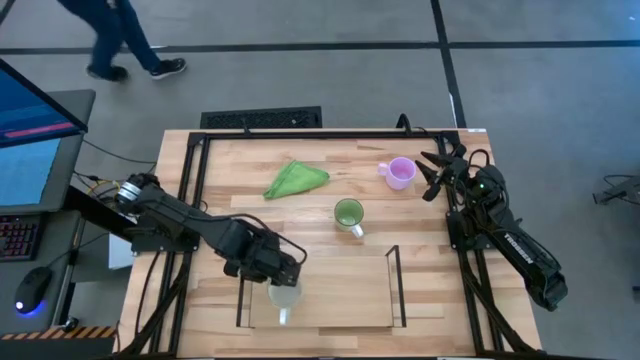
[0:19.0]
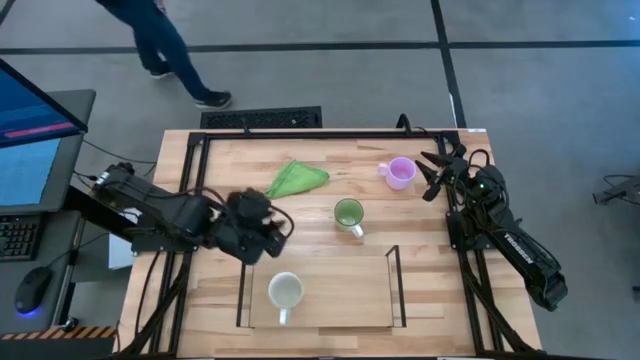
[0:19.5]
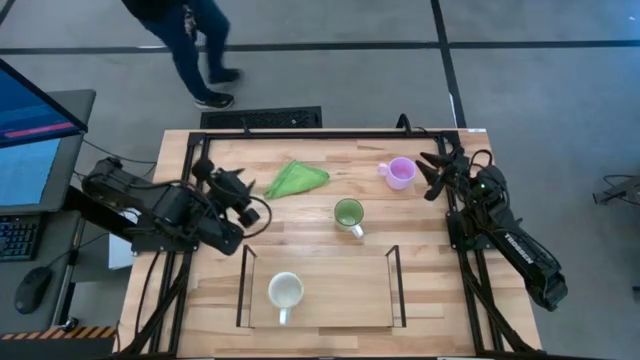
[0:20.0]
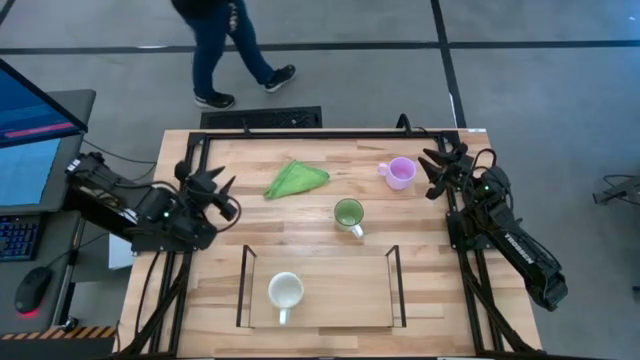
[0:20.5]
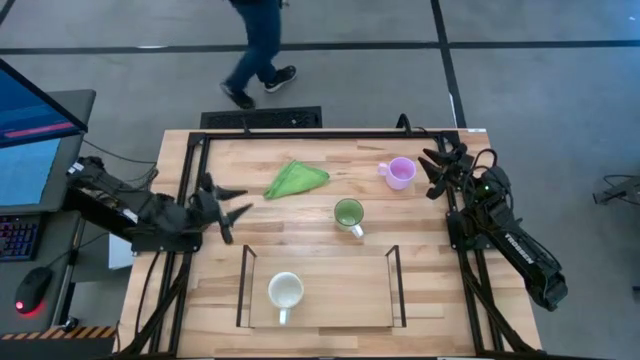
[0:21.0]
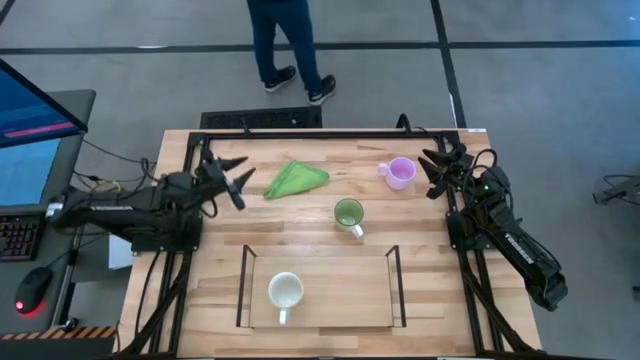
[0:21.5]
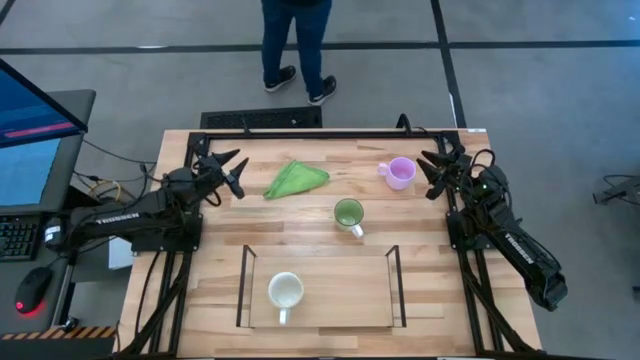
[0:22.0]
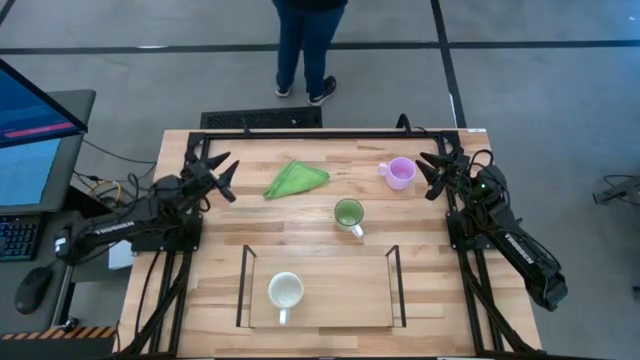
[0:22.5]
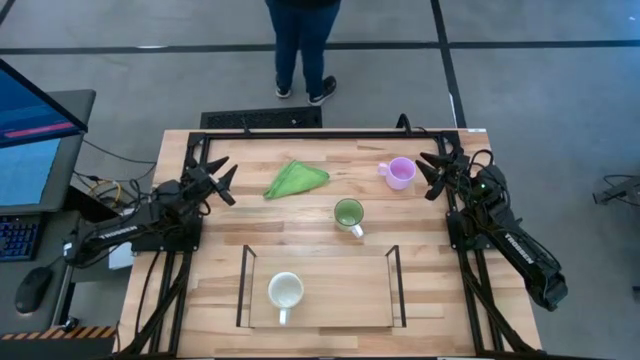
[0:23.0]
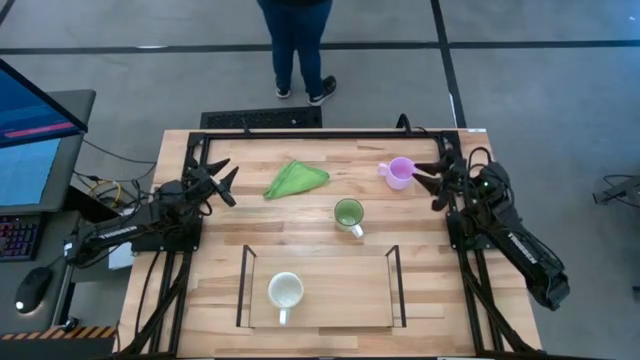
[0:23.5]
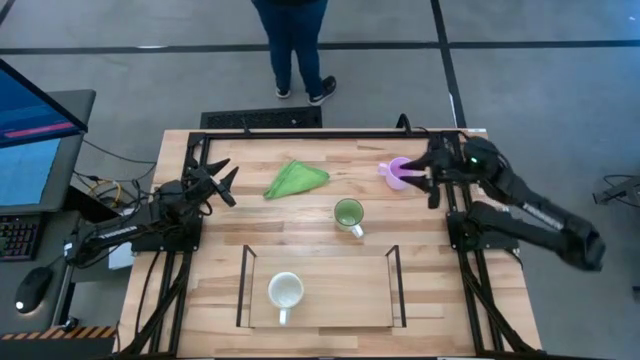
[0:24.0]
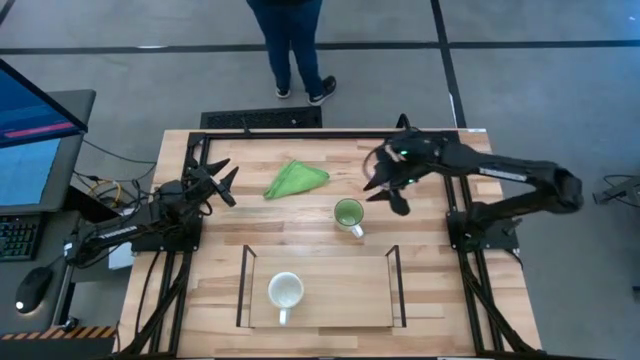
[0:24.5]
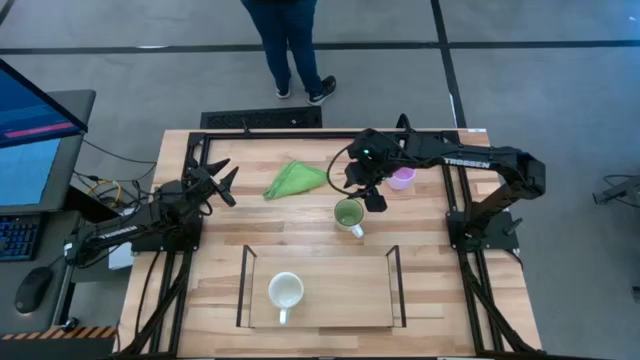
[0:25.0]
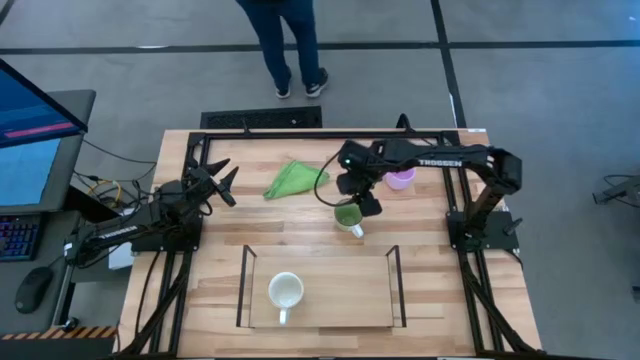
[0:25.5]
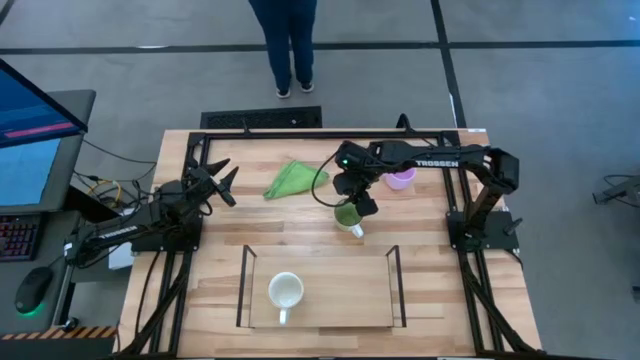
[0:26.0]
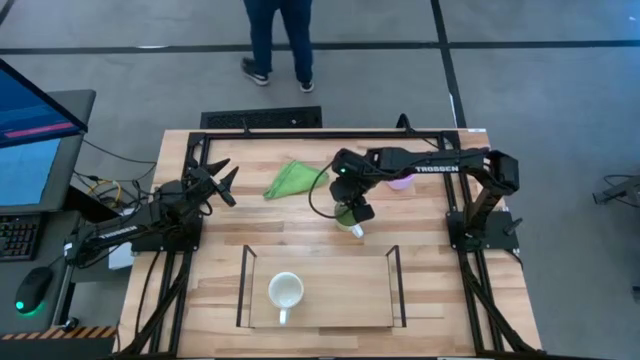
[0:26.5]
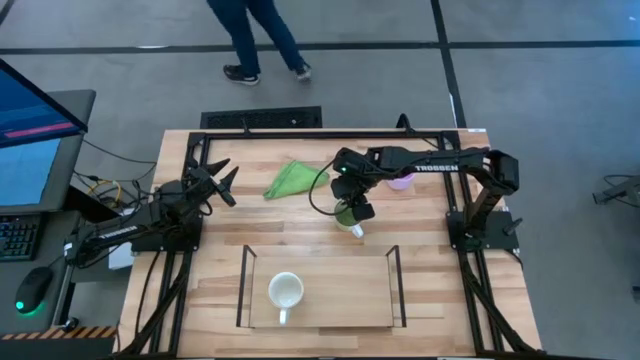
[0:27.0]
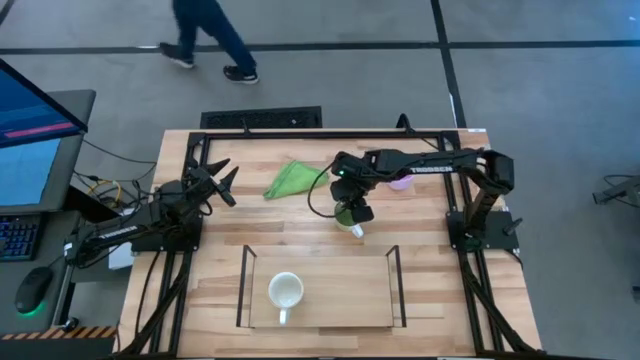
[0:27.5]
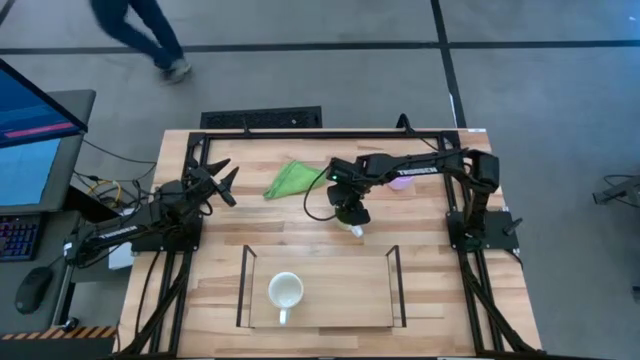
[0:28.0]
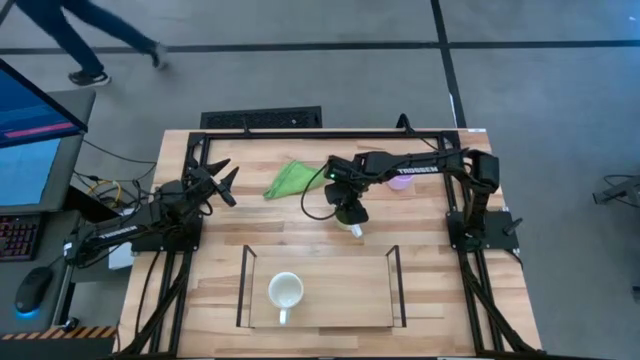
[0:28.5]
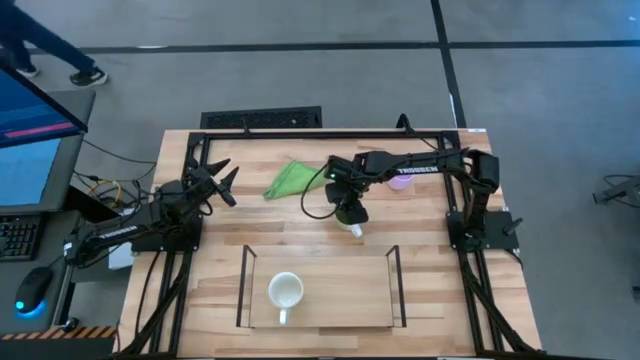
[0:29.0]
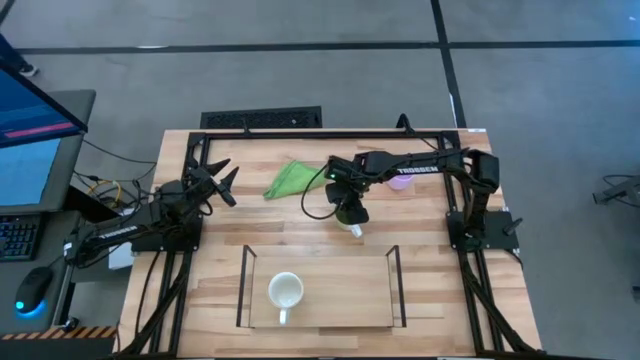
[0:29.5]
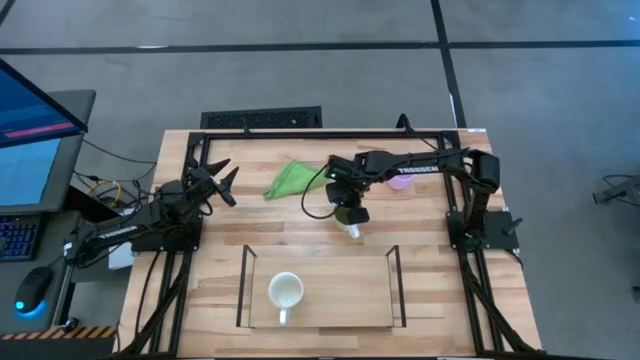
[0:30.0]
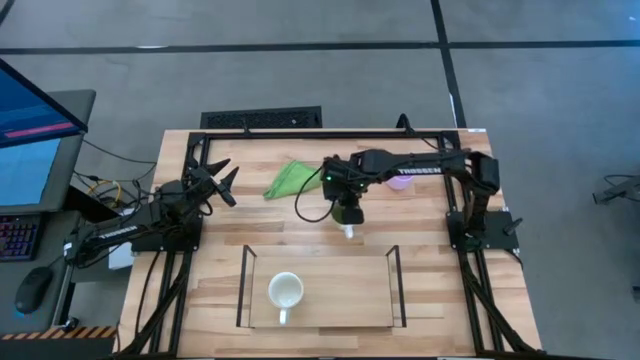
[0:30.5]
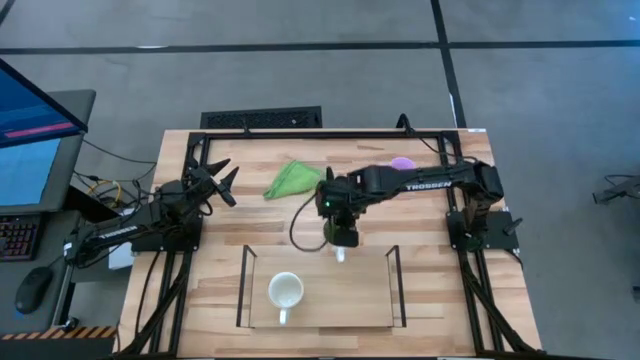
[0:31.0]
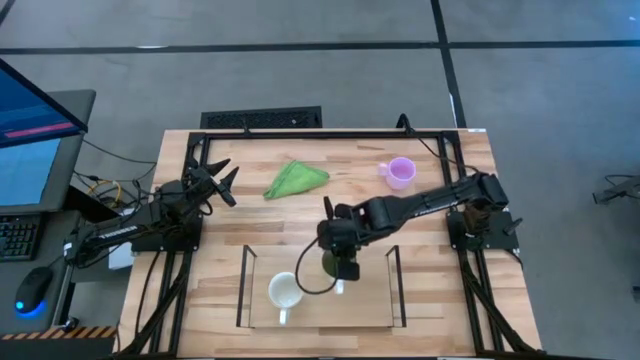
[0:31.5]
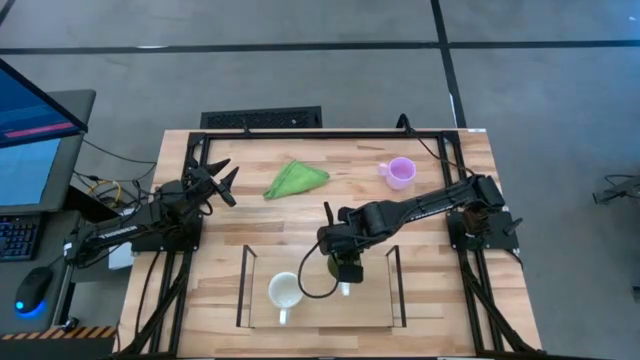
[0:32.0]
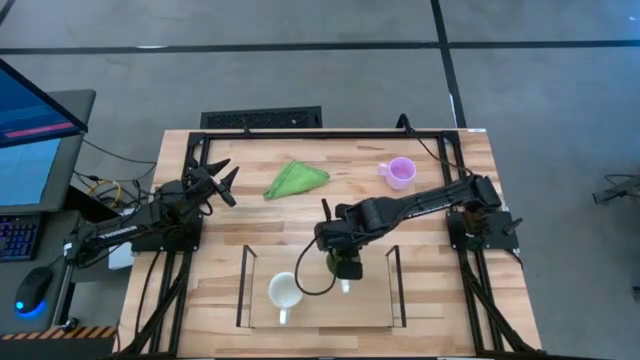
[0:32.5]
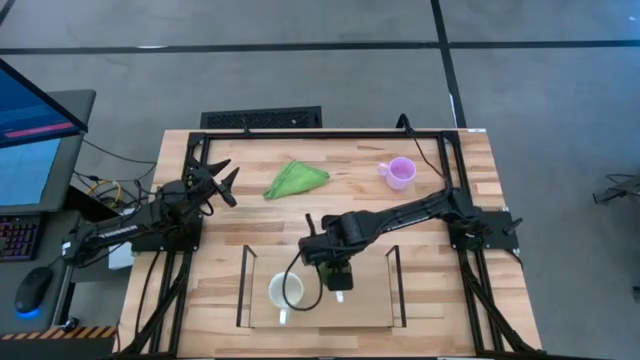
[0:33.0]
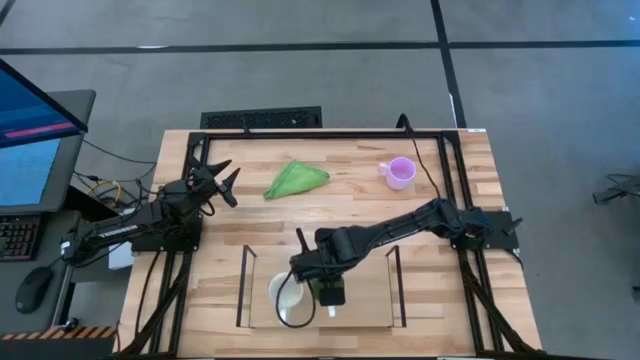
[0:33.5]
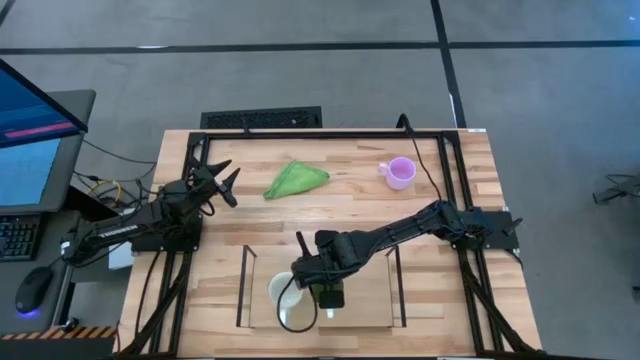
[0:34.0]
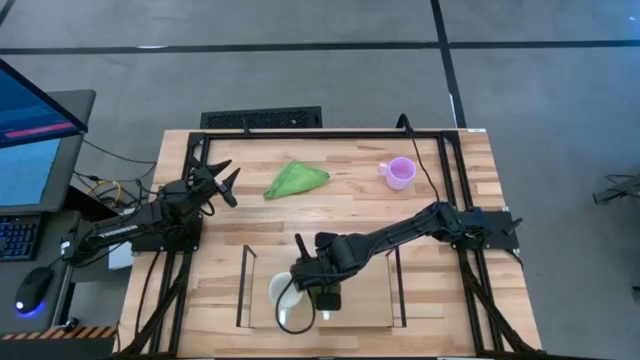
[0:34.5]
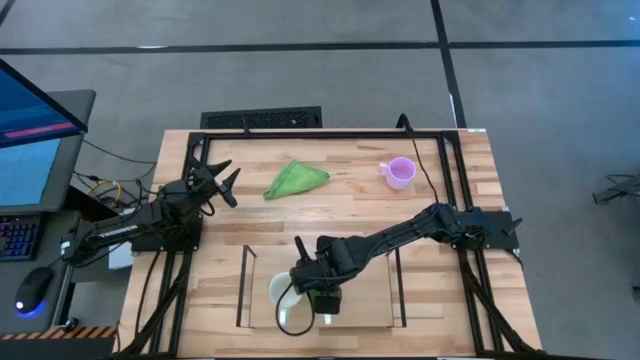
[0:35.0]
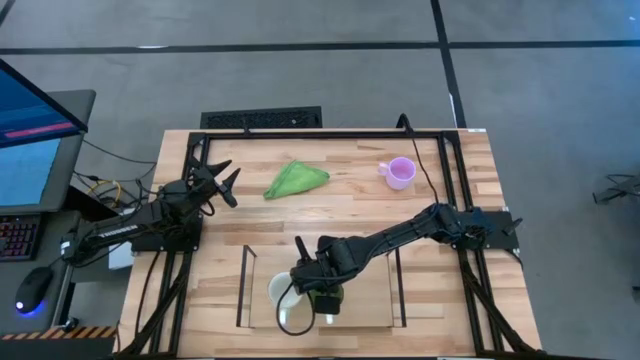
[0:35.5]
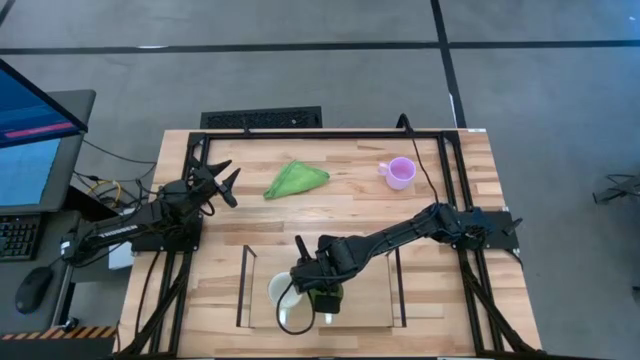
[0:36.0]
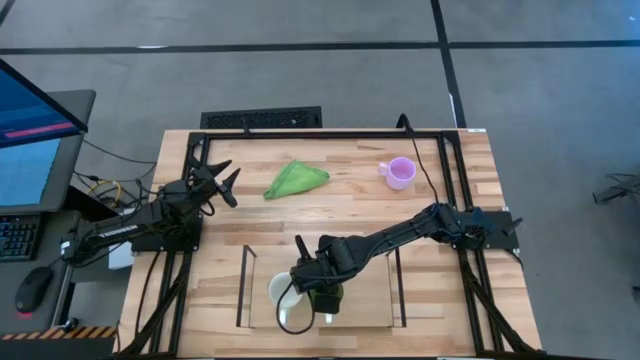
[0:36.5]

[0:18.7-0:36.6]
Task: Stack small to large cups/mugs on shelf
Put the green mug on the shelf

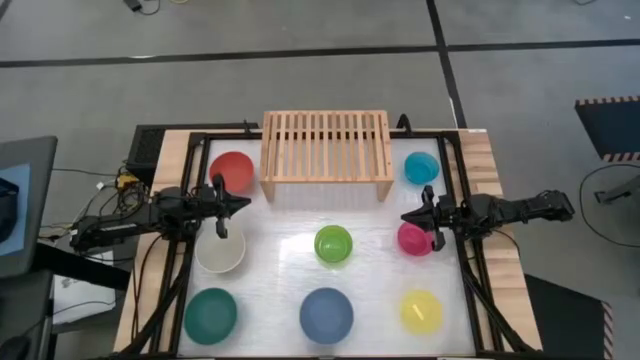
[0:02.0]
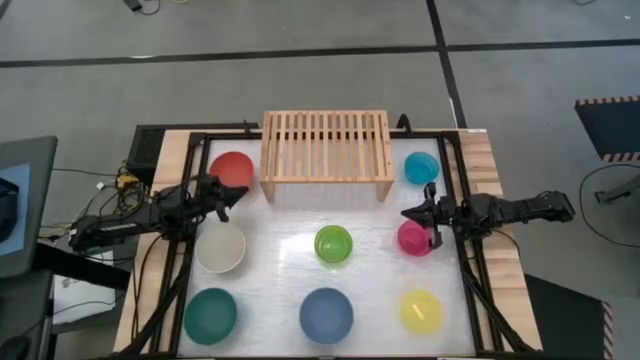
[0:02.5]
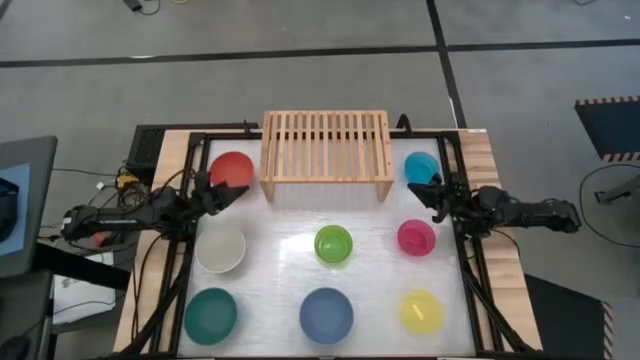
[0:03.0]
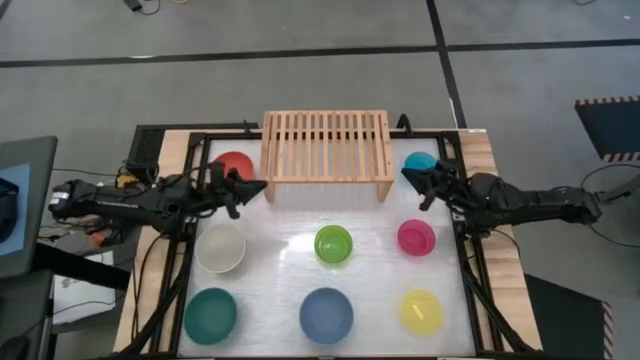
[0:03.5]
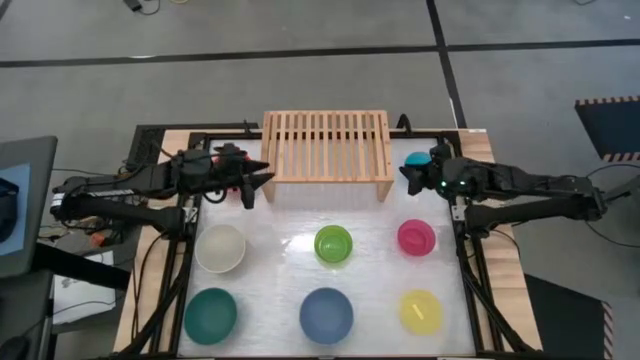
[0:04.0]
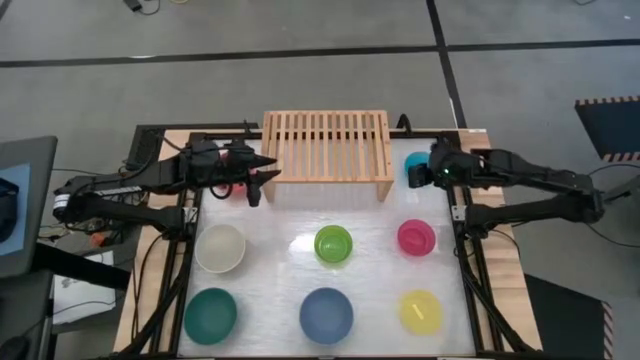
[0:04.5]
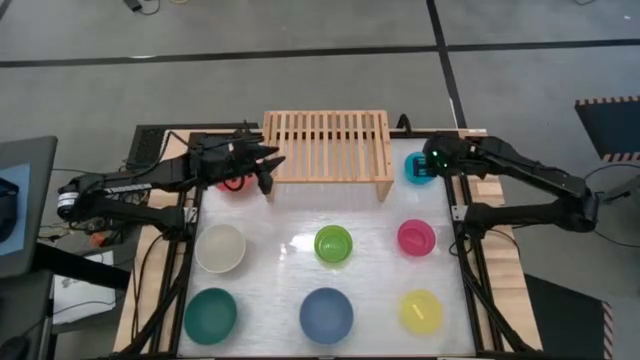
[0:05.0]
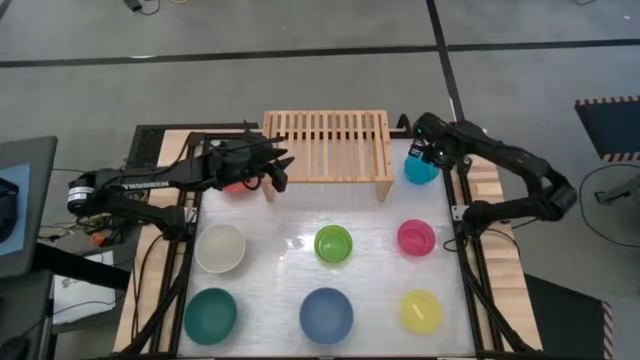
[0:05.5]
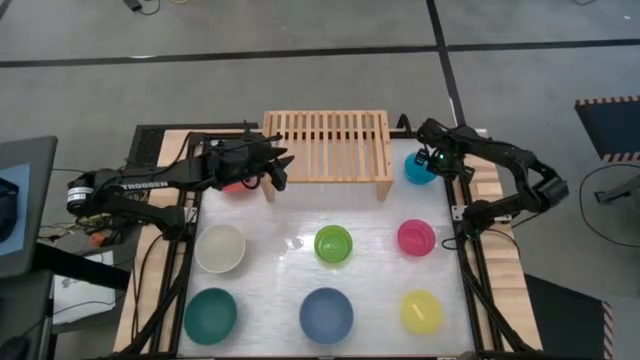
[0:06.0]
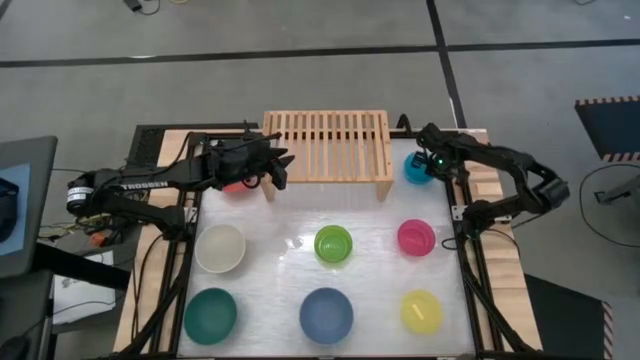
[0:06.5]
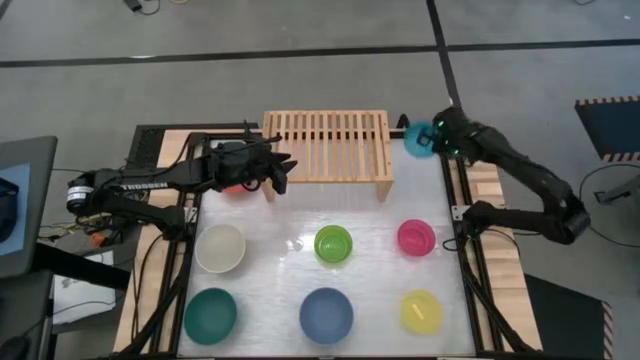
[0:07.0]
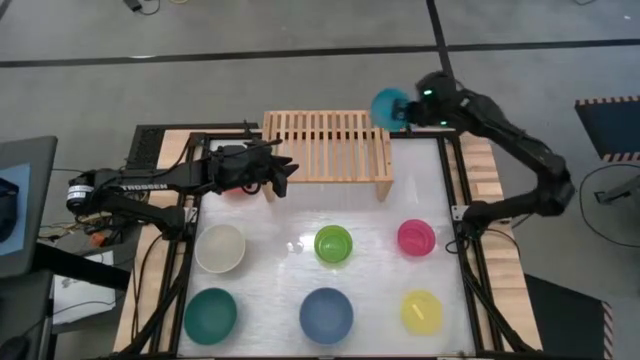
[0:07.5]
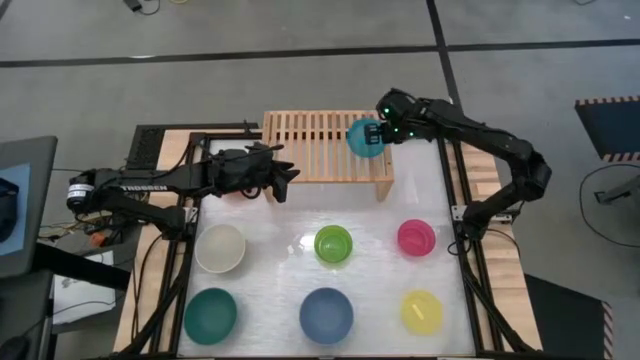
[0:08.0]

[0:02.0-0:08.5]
Task: Place and stack bowls onto a shelf
Put the small blue transparent bowl on the shelf
